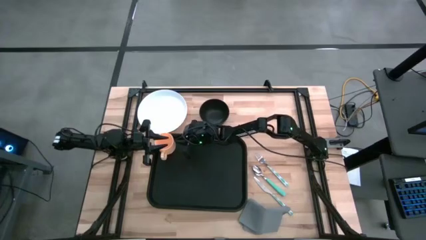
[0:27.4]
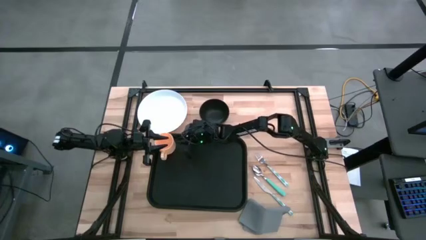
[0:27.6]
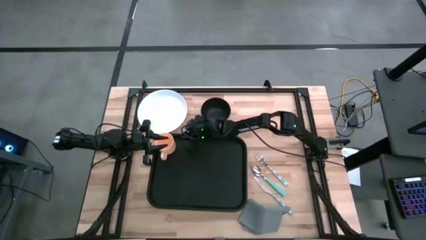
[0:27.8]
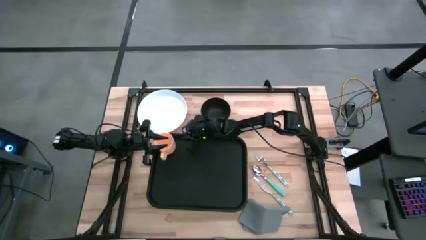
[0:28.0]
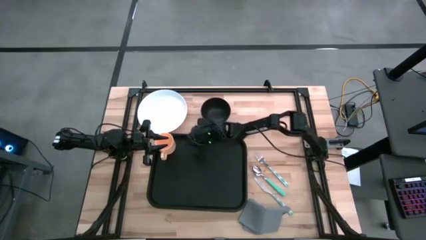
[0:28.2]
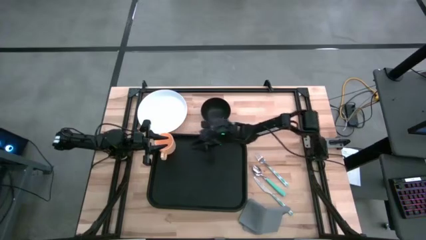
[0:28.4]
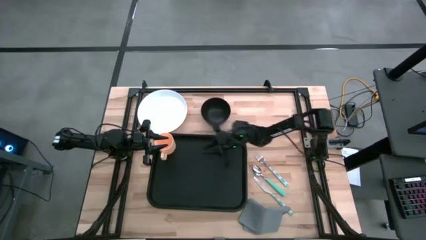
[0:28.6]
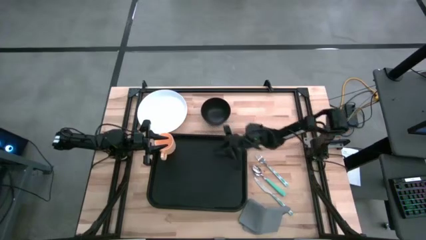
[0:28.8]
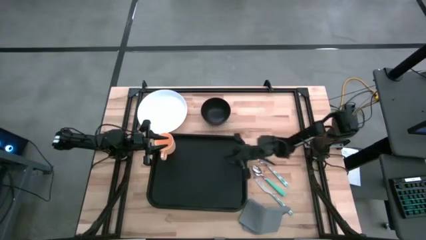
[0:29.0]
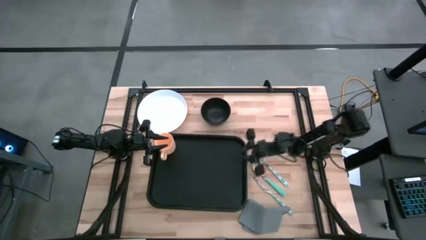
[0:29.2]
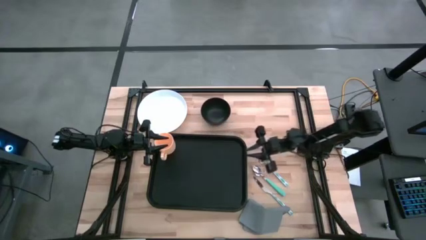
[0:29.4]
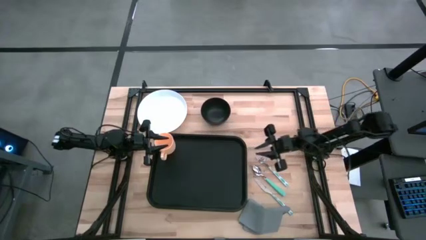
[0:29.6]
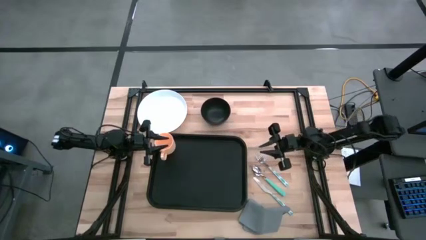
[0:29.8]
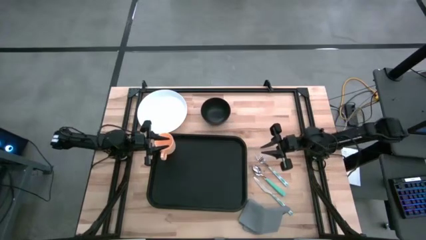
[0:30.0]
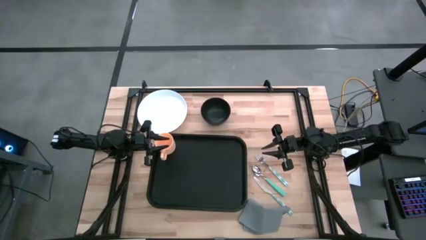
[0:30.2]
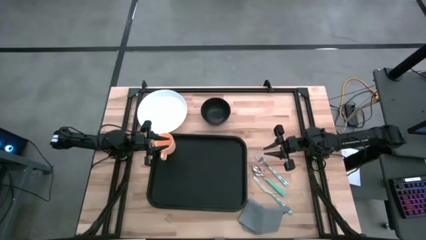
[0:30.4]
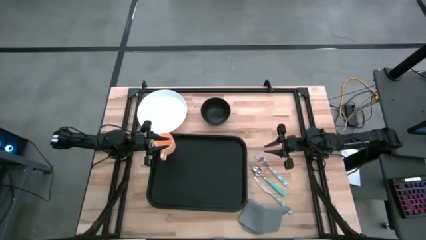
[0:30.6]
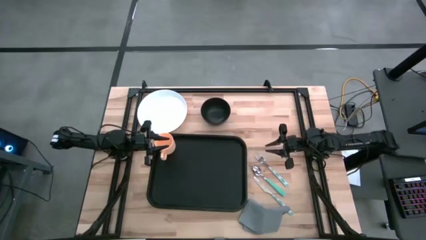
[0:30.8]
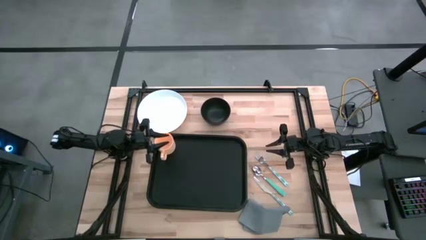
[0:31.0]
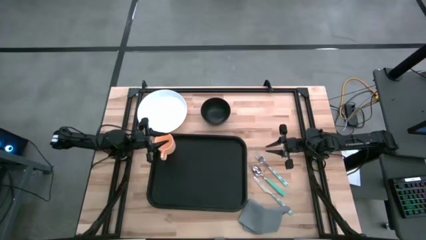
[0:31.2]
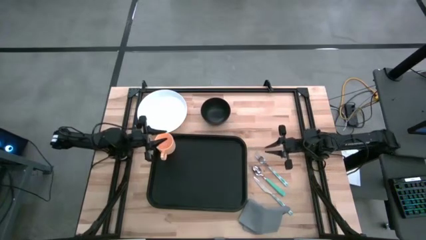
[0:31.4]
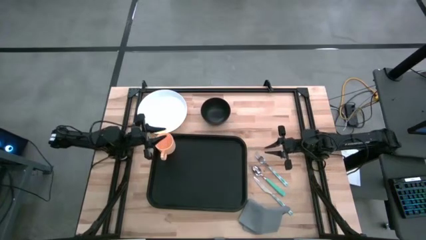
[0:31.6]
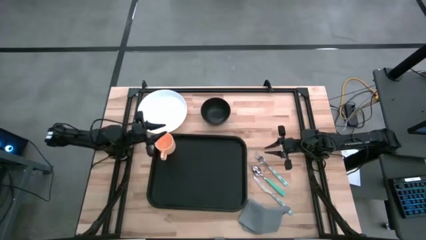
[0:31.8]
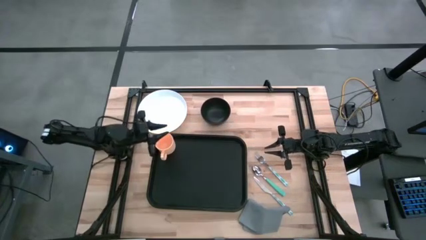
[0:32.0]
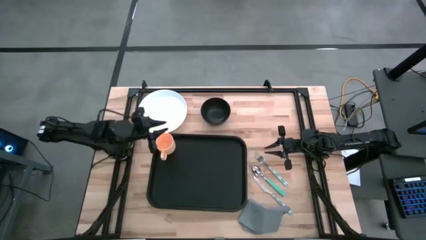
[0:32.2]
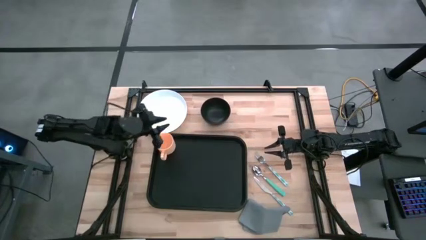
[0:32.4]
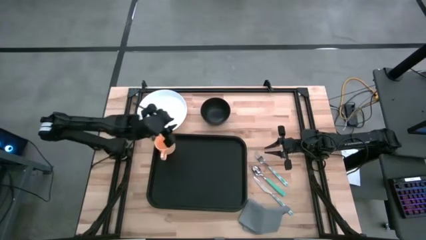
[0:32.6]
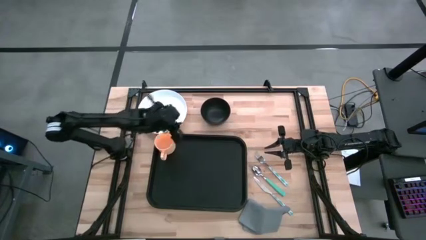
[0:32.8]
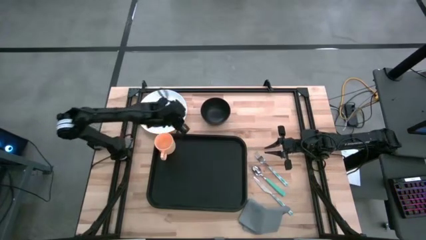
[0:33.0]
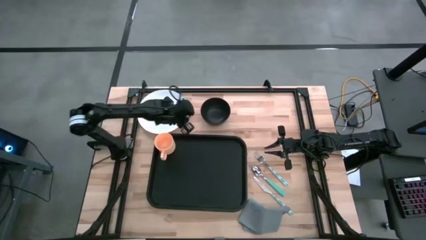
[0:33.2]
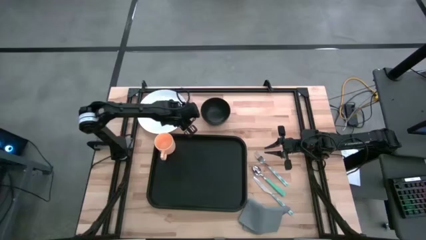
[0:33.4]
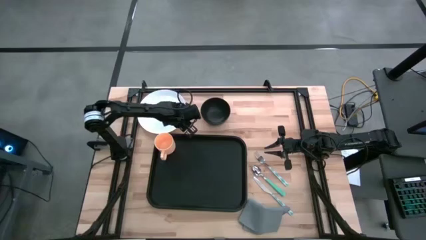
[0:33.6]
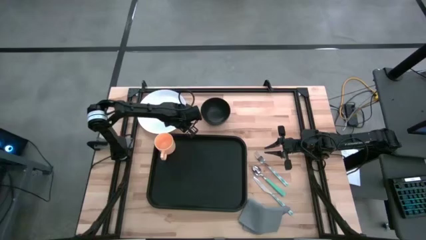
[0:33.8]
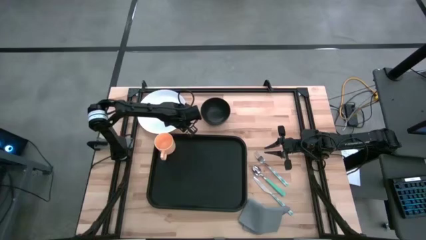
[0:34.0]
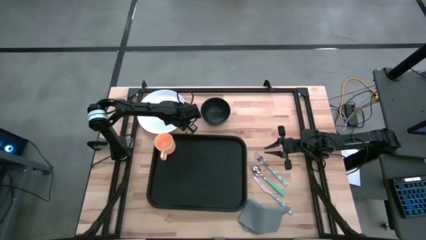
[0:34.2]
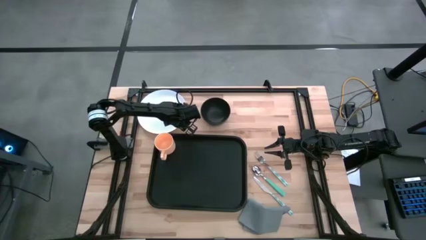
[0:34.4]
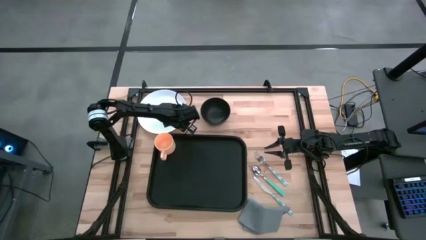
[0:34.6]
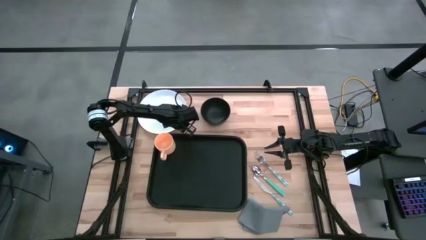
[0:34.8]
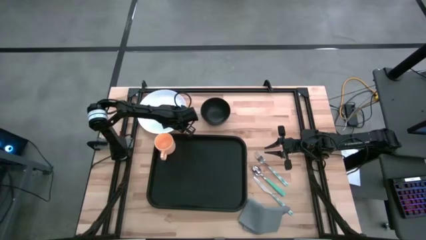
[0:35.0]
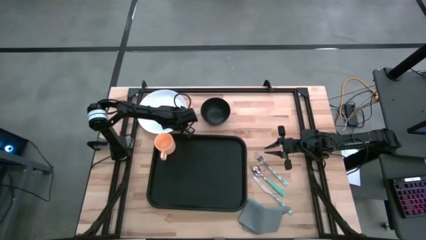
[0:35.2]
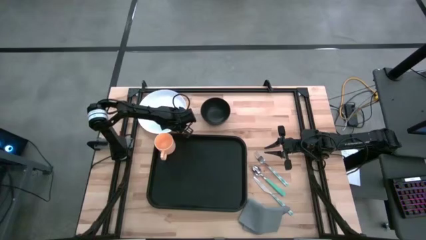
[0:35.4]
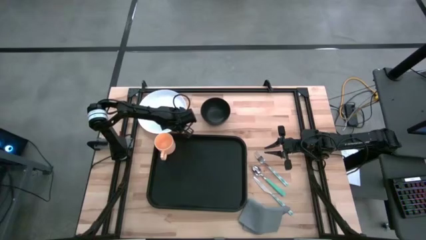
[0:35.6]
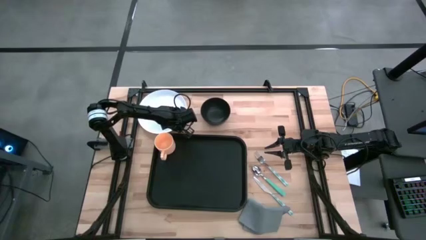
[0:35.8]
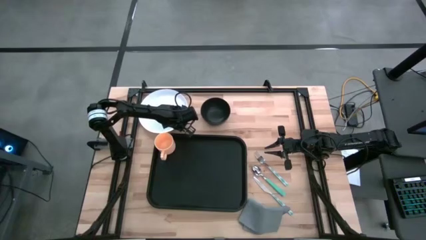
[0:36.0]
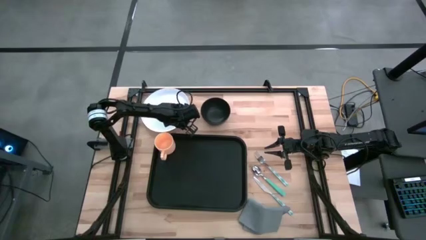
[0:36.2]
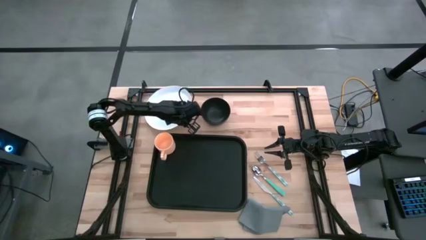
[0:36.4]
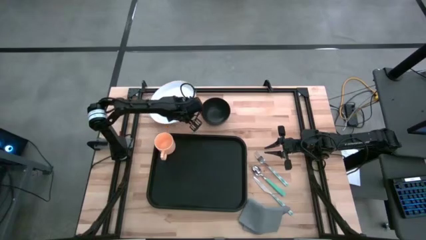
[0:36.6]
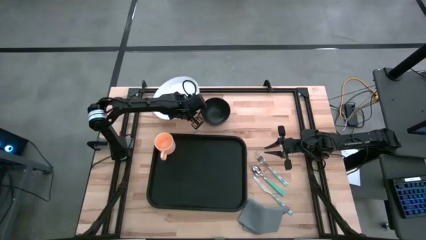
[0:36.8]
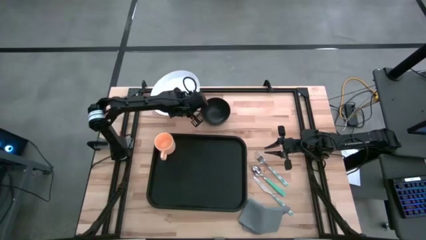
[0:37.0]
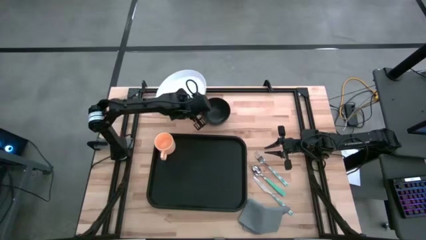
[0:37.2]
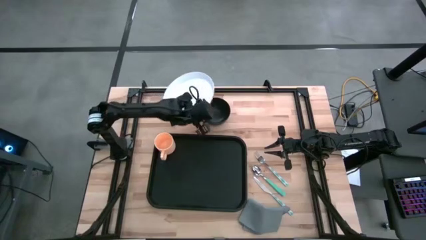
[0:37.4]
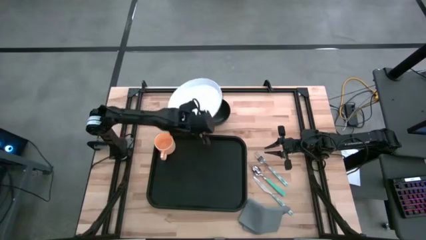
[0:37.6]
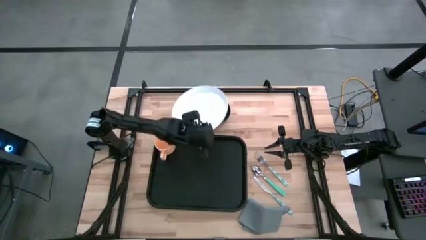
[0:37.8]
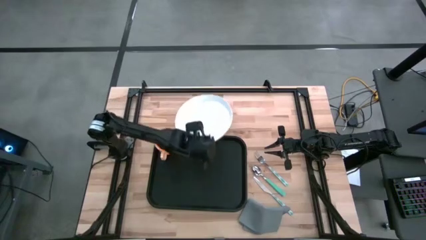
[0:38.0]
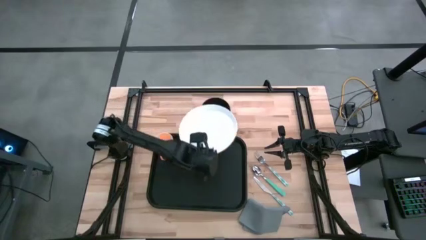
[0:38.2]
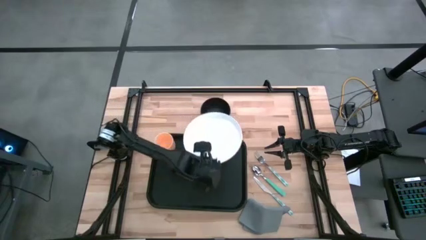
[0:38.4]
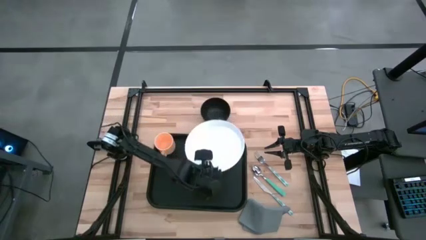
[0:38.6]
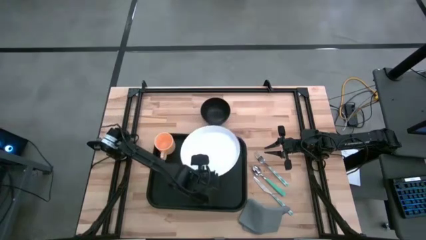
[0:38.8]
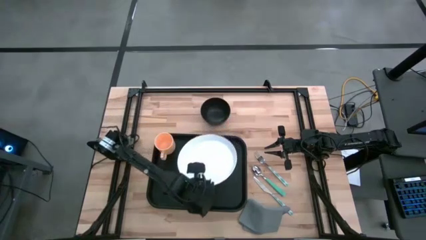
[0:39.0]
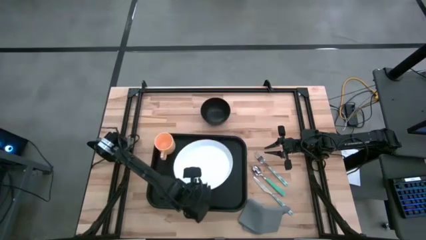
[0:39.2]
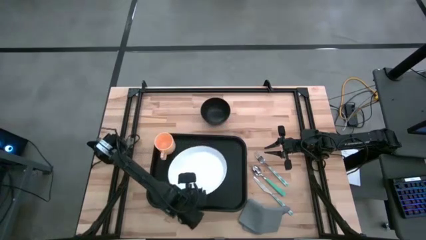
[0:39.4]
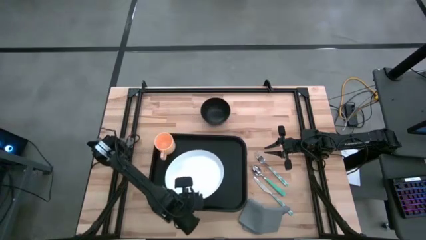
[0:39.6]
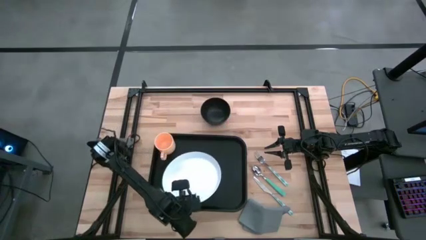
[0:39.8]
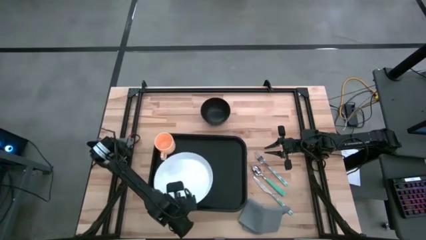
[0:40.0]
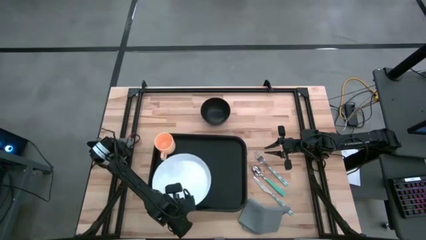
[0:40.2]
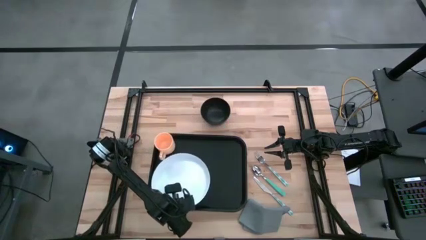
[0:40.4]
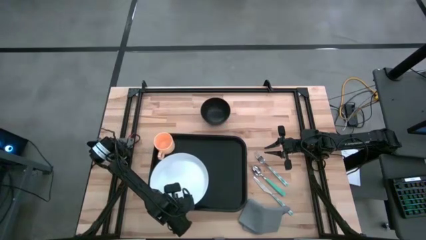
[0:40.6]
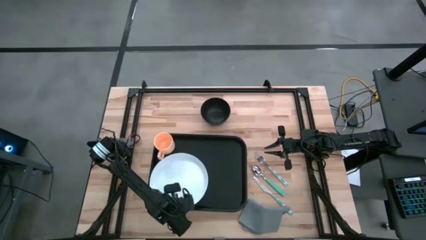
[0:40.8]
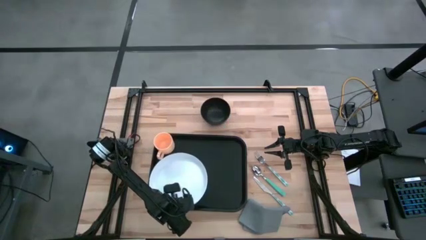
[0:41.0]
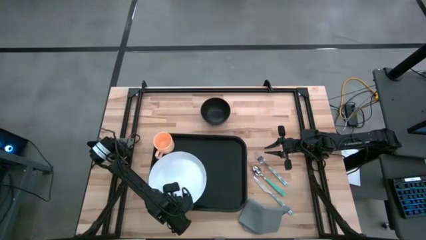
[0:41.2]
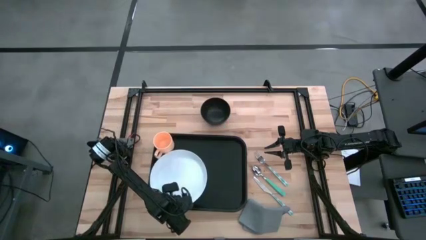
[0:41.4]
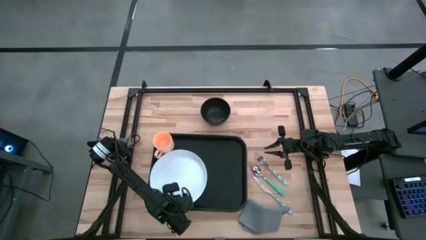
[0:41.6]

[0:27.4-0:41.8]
Task: Set up tray
Put the white plate on the black serving tray

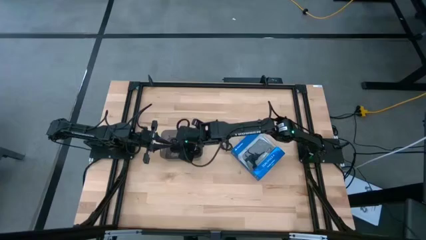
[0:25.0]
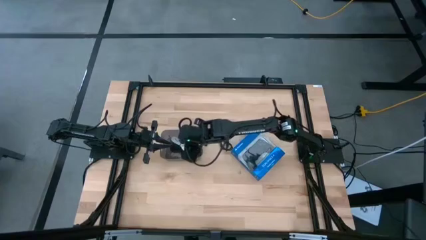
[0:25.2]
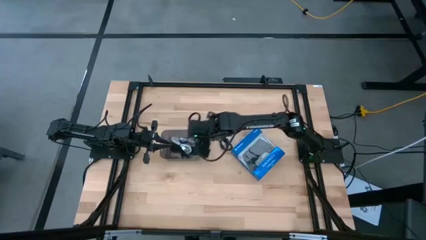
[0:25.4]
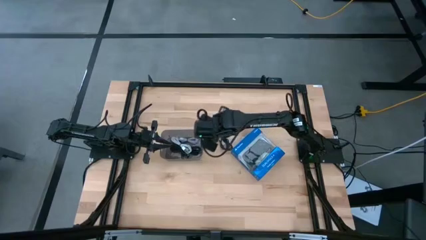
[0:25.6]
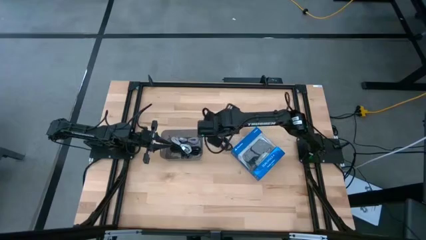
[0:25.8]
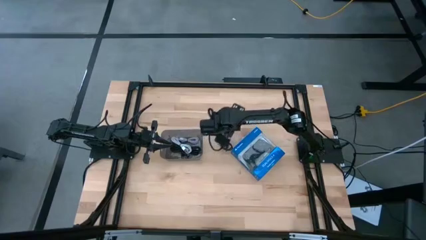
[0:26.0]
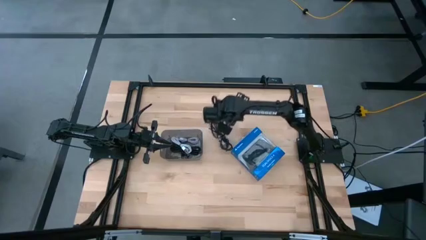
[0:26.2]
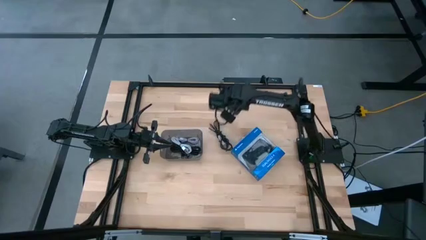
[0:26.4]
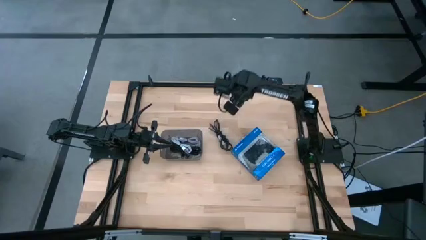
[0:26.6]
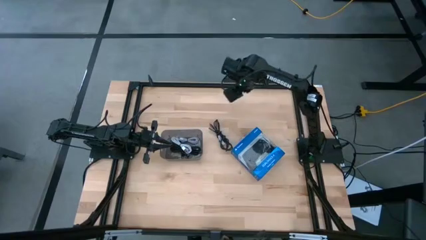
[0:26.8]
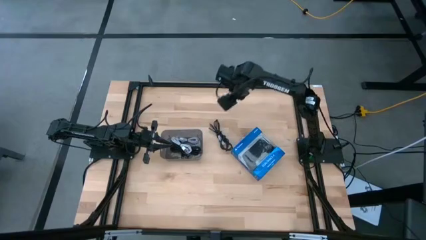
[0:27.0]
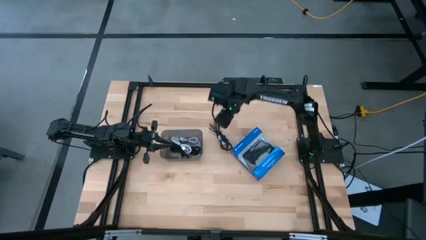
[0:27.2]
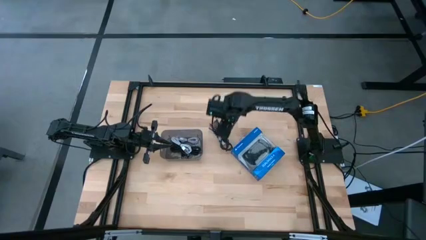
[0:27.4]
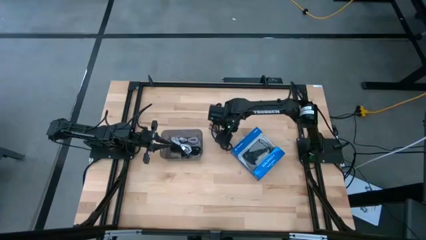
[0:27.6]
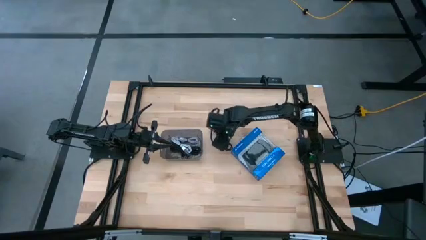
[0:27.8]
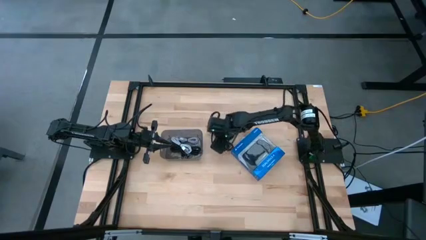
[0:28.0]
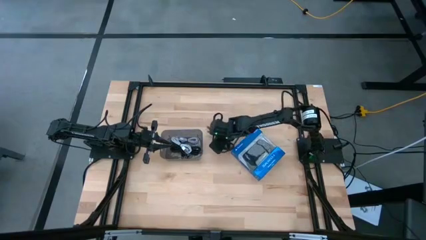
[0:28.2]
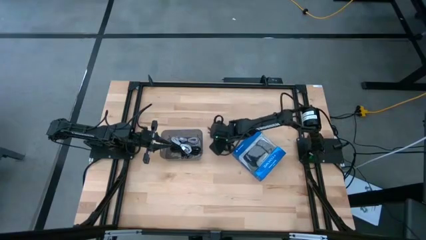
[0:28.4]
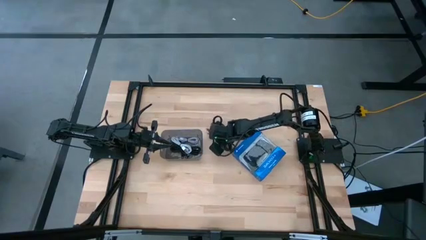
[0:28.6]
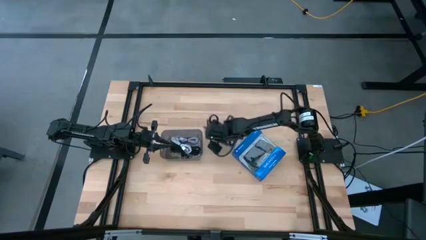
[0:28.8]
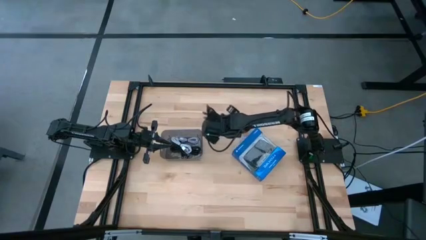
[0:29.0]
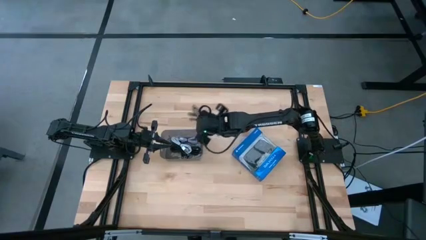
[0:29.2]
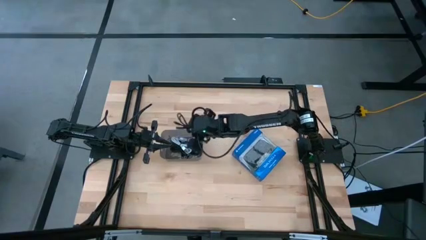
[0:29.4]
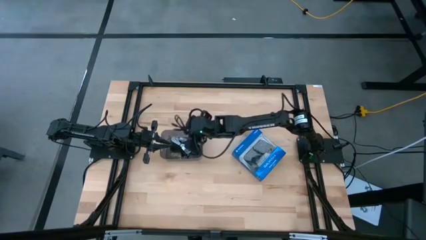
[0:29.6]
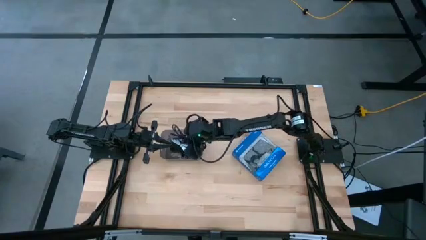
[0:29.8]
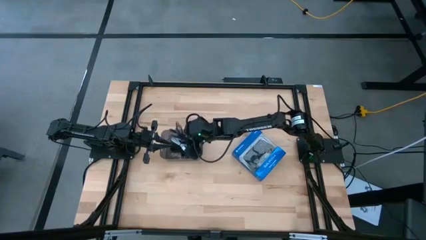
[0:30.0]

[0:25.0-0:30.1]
Task: Pick and place USB-C Cables
Put the black charger cable into the black bin
